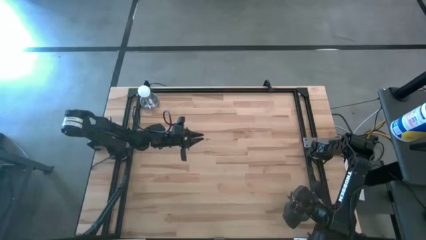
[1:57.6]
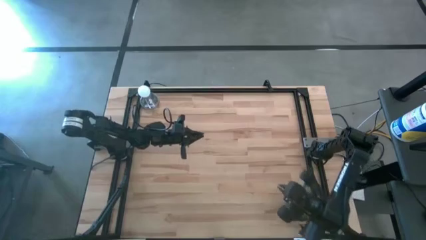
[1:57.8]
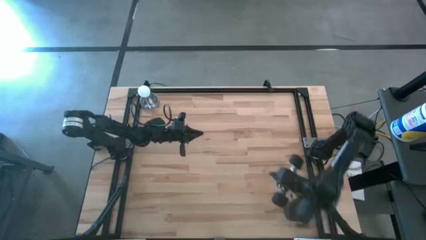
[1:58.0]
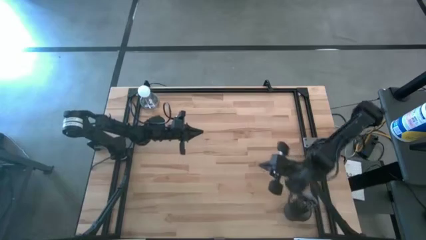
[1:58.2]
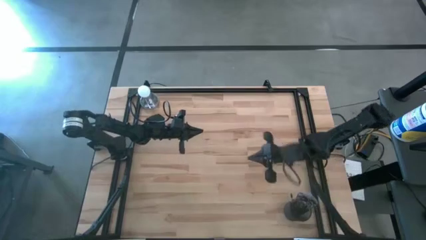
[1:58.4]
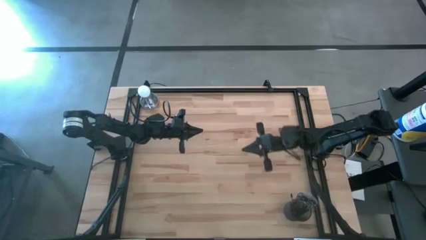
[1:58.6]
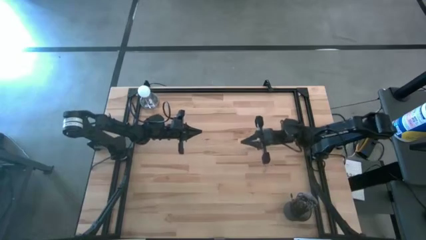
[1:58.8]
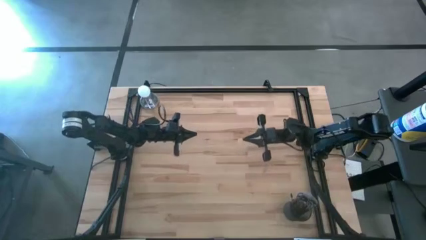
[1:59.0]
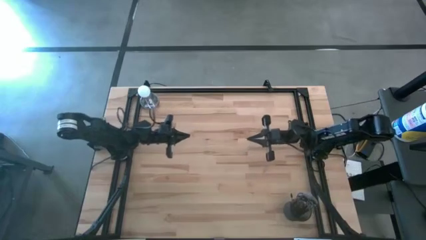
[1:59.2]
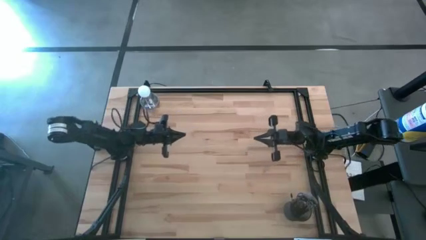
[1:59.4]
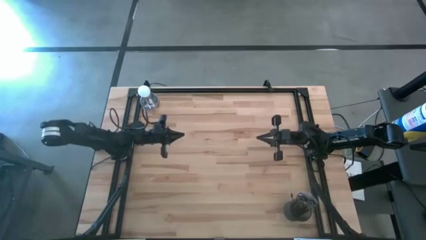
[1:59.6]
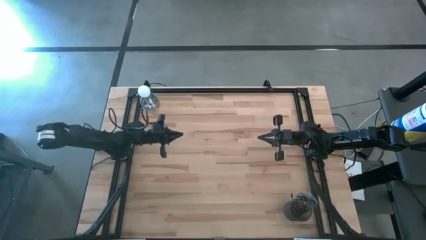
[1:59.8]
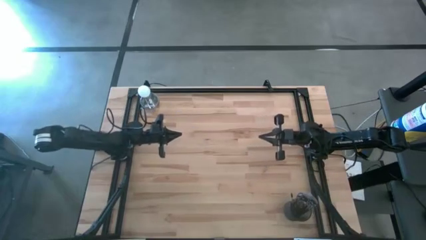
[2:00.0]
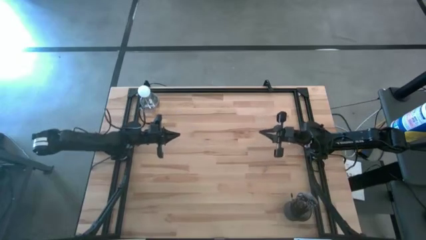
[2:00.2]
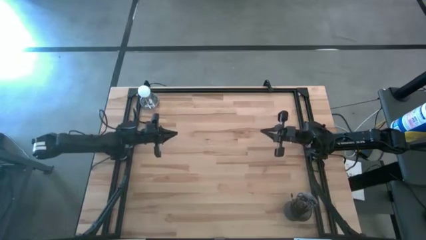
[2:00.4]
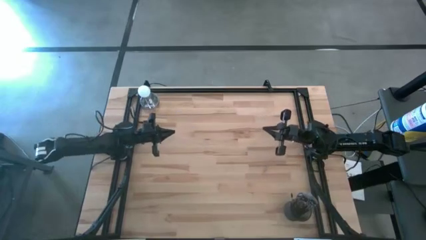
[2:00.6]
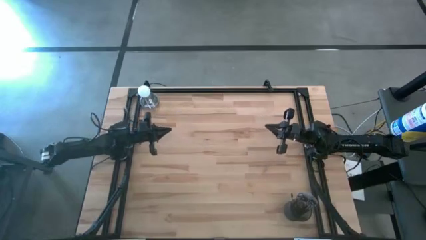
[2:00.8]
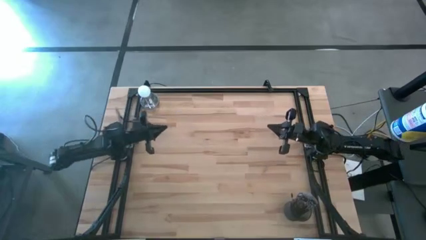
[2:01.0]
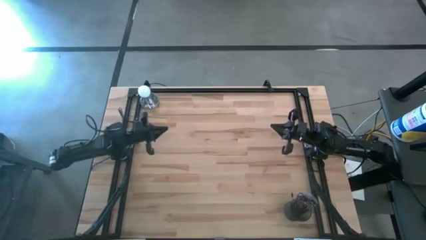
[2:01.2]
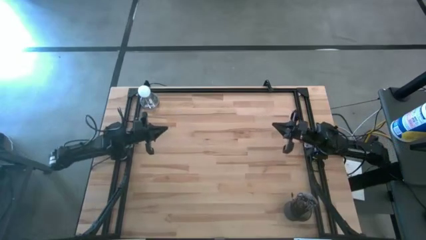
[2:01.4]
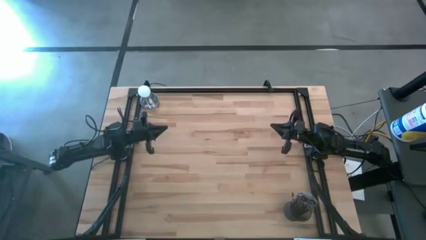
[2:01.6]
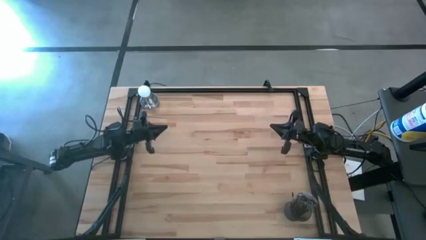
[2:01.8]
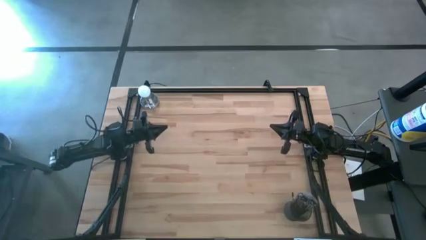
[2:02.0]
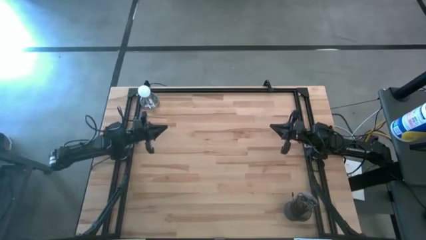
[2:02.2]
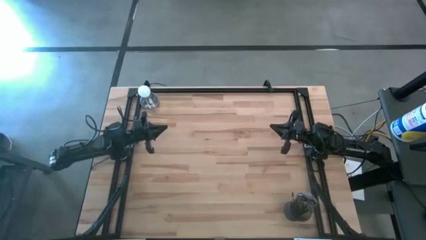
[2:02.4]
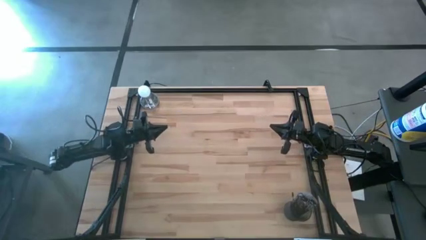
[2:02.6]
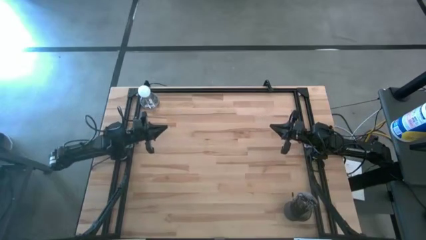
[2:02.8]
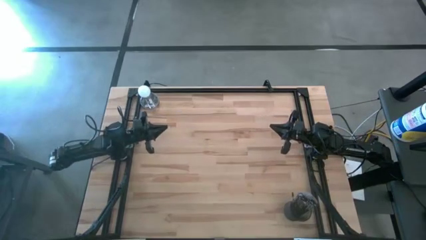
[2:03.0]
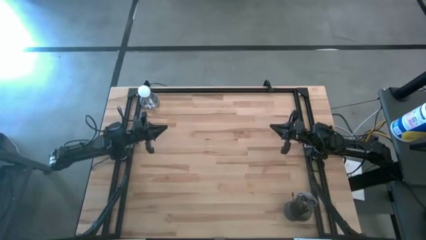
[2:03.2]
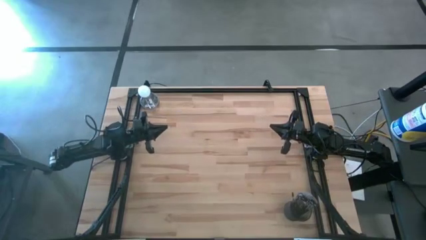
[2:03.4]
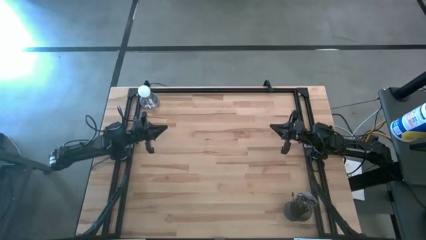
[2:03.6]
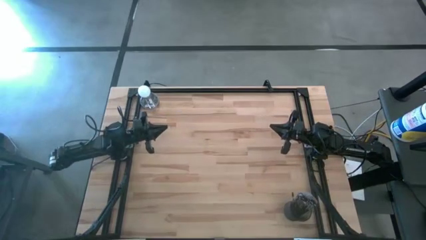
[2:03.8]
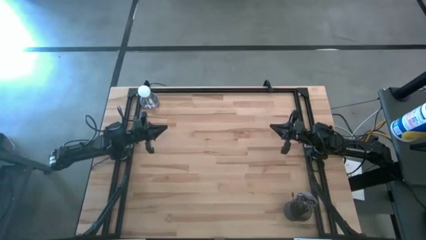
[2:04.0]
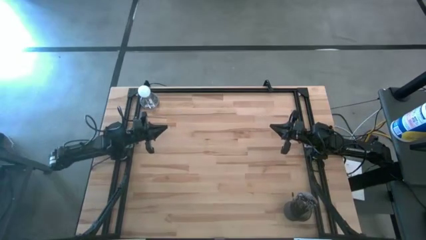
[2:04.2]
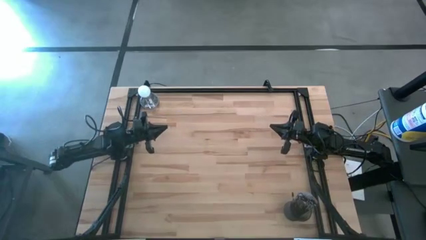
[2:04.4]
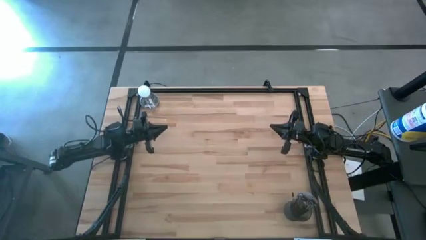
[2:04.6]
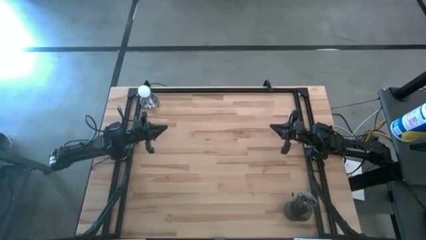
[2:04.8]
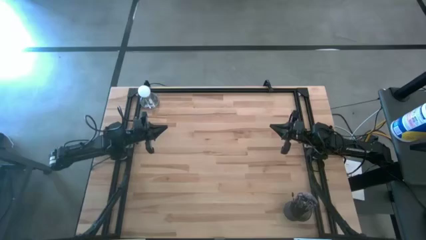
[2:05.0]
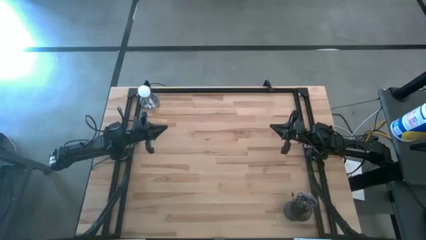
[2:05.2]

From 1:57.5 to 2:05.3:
Task: Pick & Place Makeup Brushes
Return to Home Position

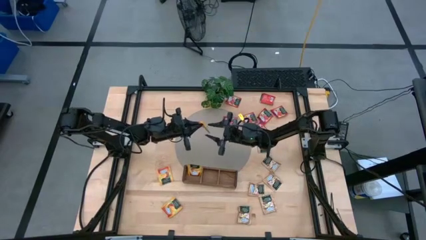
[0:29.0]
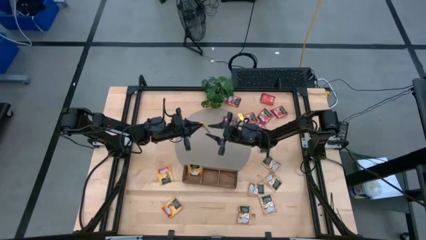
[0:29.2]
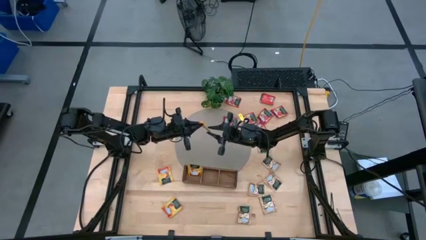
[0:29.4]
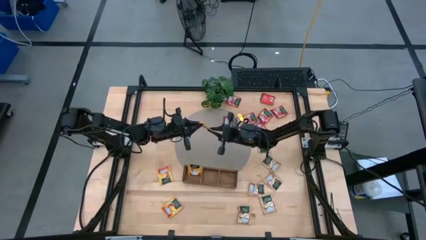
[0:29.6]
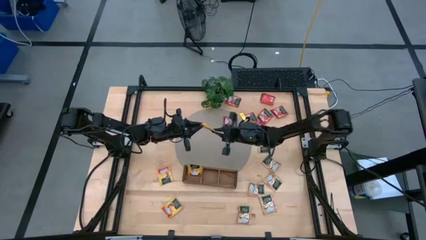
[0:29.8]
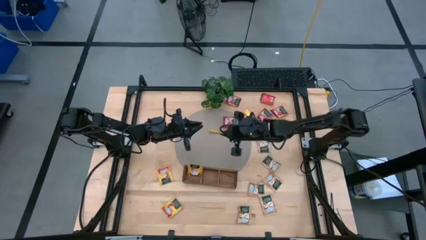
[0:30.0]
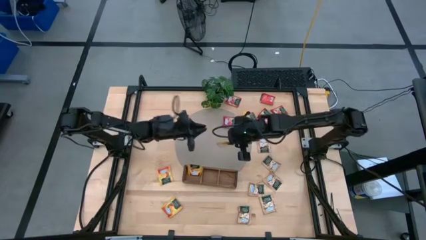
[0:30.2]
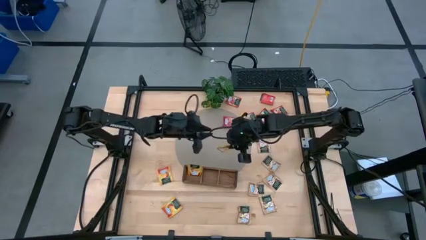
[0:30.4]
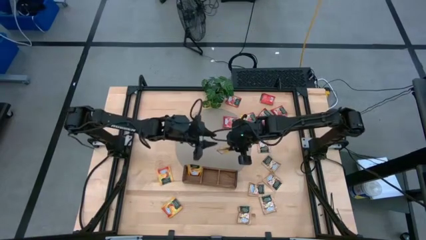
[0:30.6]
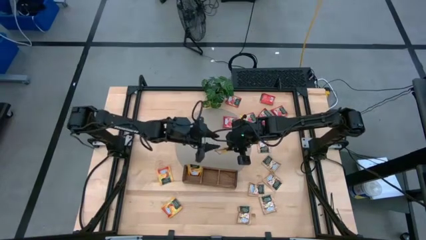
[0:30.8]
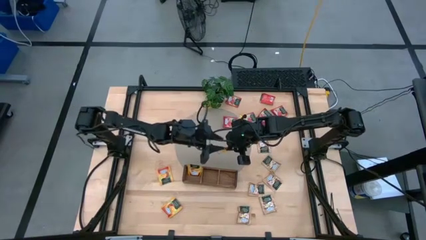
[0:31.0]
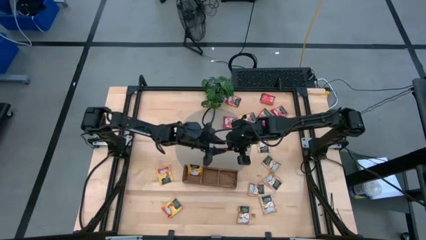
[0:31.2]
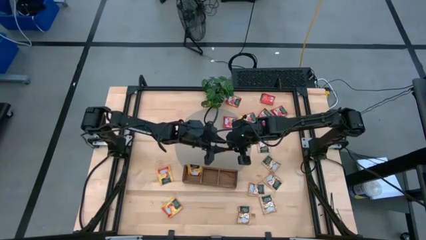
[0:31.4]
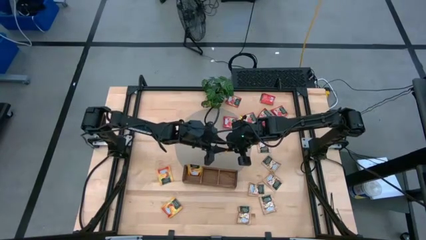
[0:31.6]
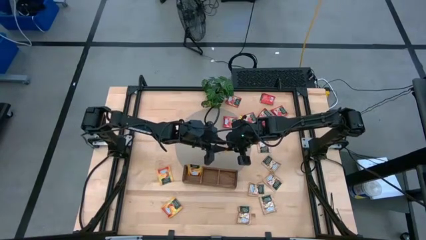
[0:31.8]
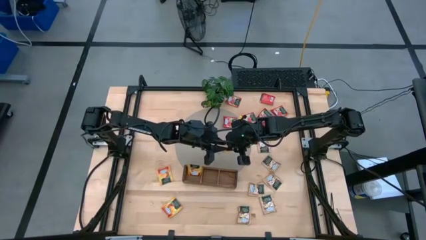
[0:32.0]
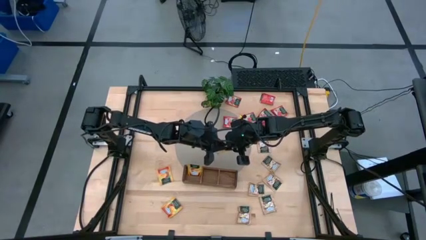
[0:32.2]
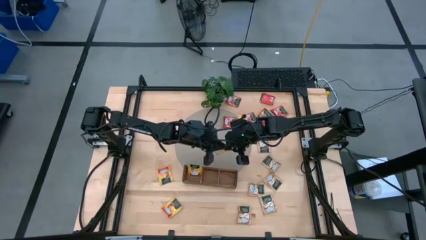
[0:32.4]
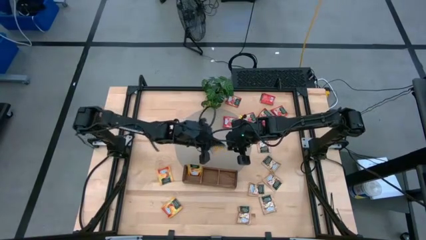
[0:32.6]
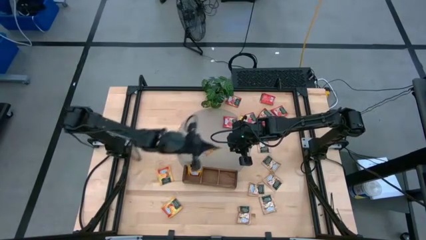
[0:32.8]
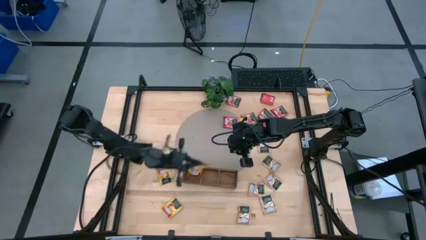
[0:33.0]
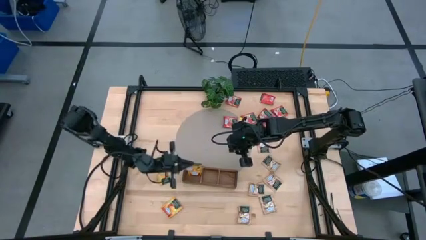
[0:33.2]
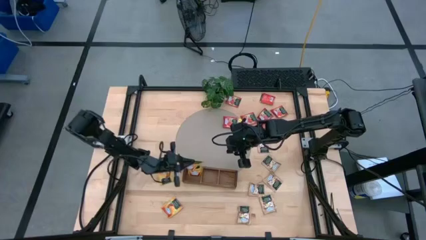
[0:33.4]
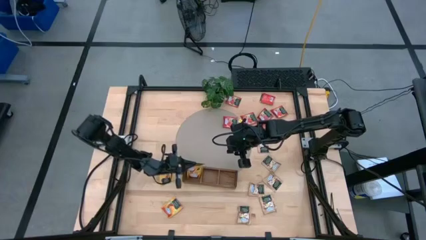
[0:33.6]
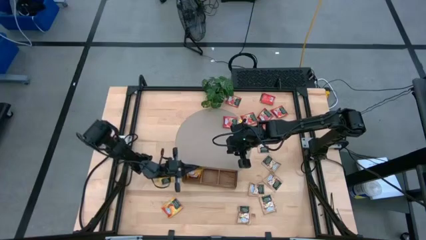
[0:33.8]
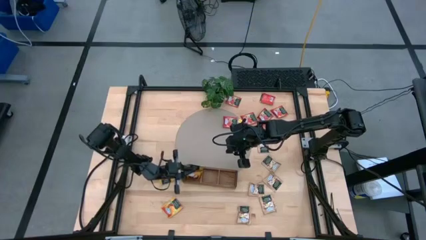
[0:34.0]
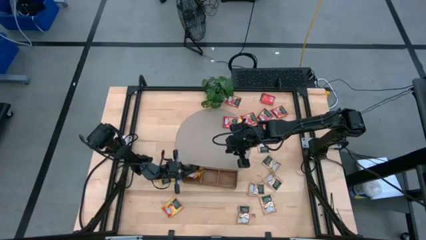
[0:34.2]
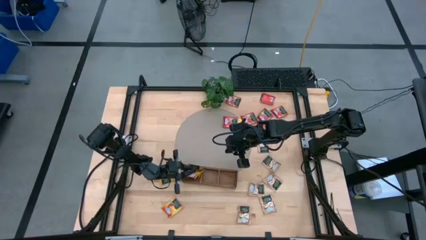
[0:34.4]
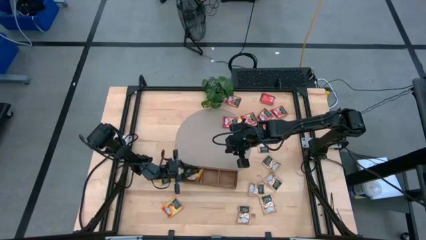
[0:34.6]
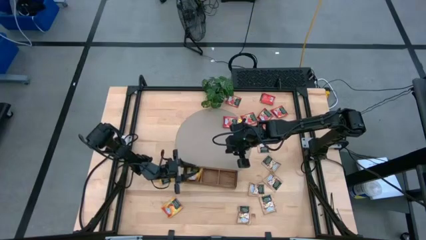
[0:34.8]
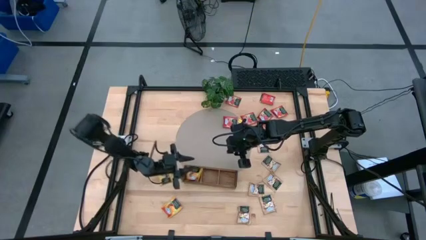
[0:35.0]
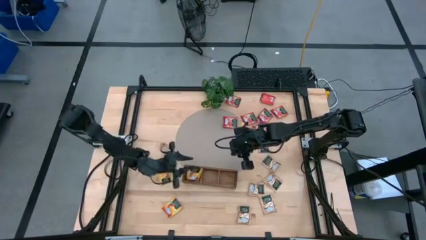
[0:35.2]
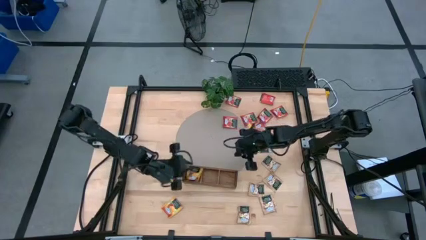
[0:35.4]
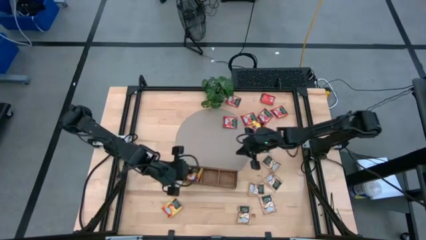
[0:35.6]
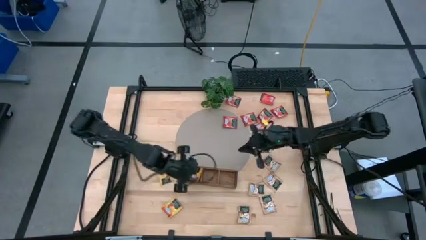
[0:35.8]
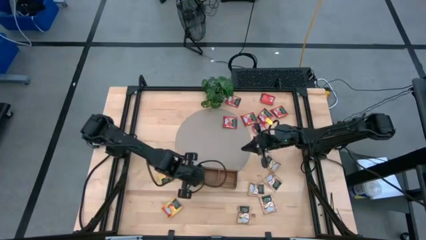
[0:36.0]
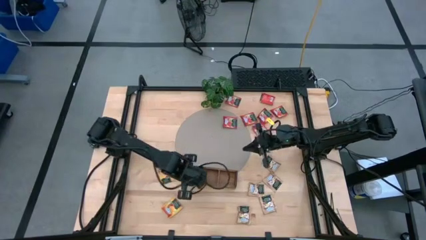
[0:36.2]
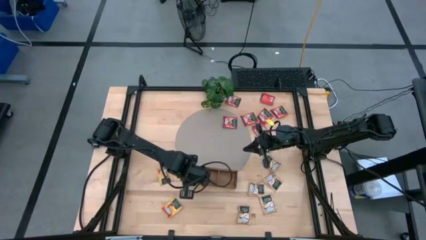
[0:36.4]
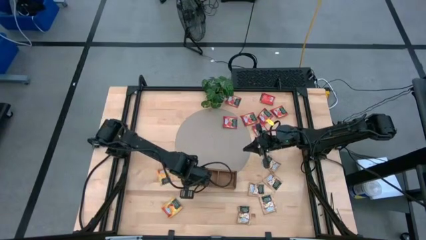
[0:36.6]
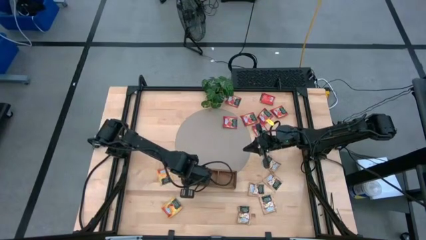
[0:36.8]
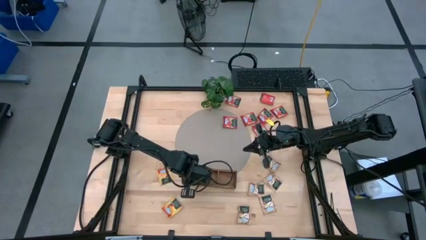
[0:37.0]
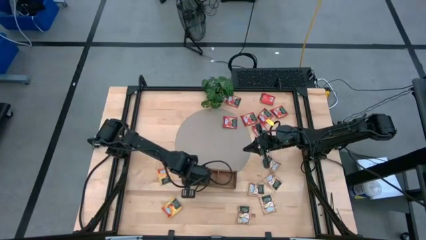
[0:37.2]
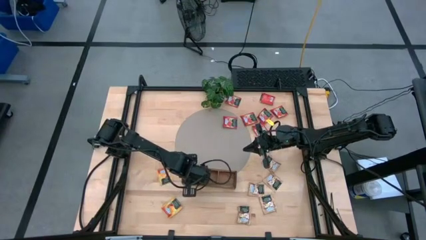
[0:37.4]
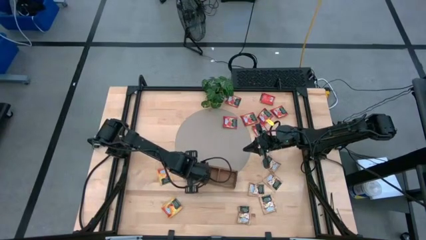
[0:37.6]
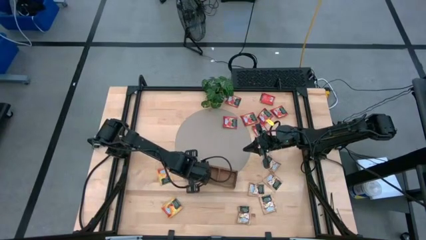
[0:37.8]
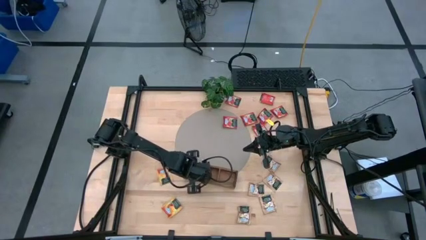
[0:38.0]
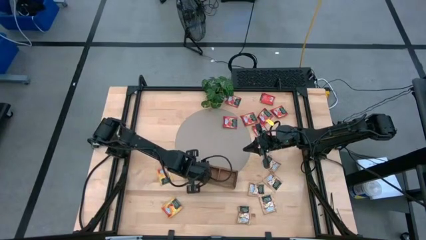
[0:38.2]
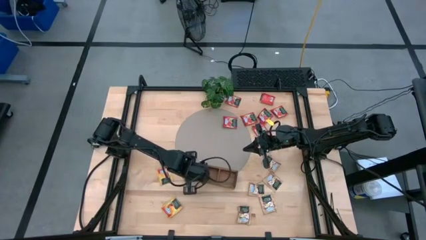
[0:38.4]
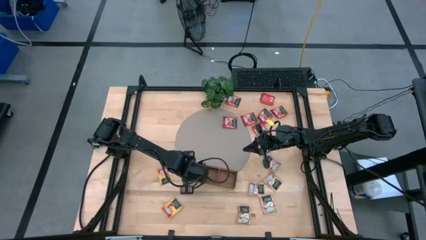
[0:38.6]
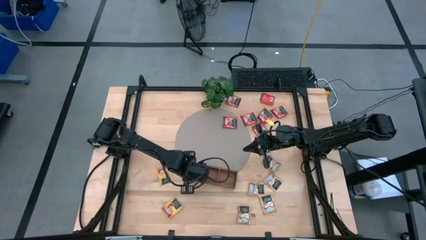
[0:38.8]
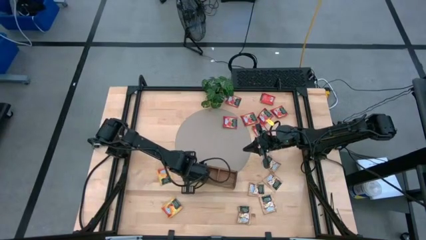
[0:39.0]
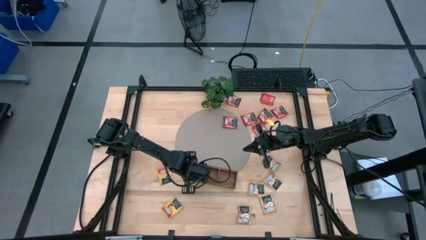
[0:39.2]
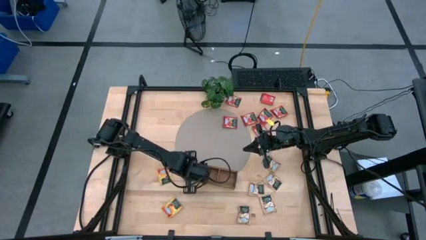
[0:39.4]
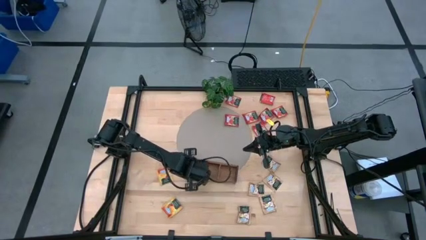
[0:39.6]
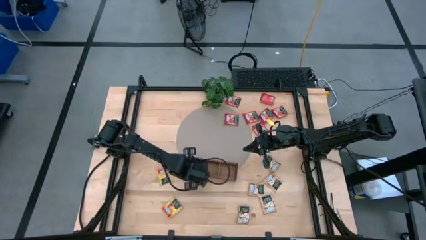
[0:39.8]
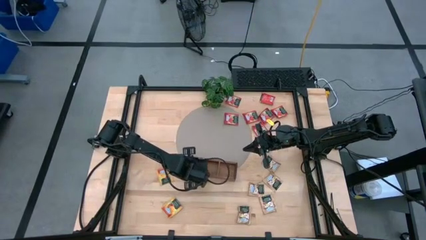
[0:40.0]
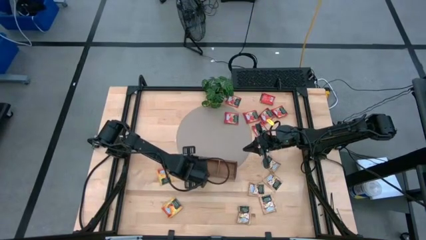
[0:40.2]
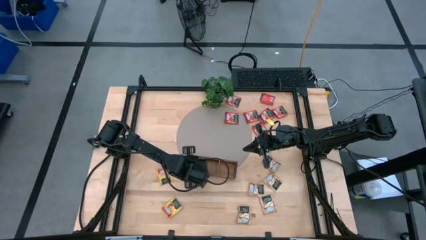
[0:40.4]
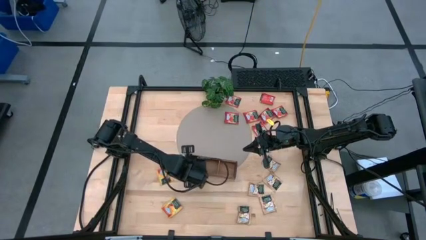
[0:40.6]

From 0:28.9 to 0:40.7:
Task: Pick & Place Tea
Put the top orange tea bag into the left slot of the wooden organizer
